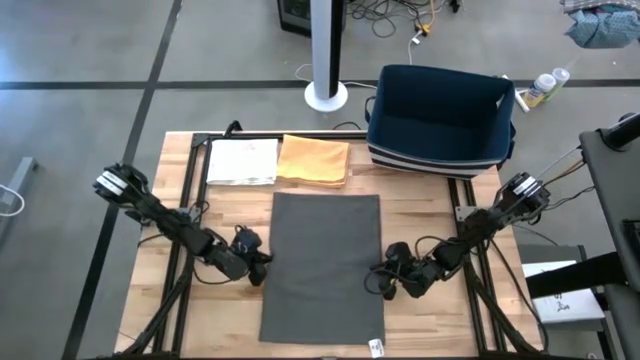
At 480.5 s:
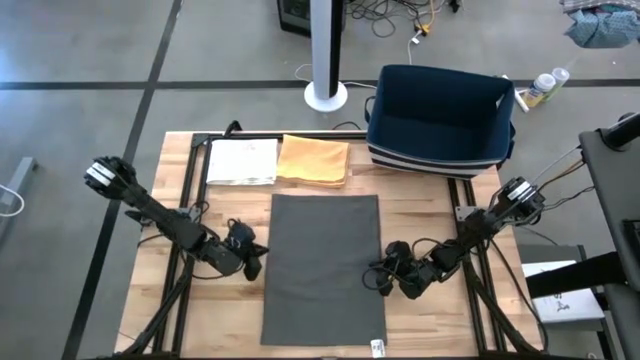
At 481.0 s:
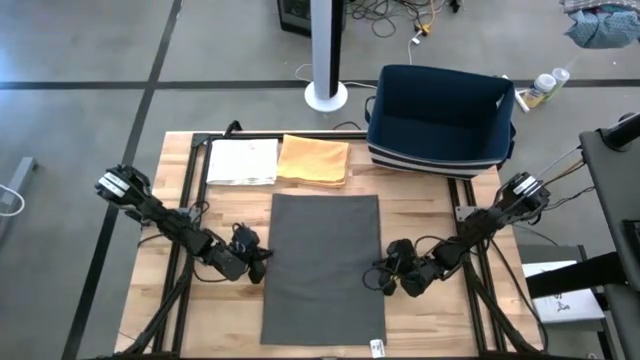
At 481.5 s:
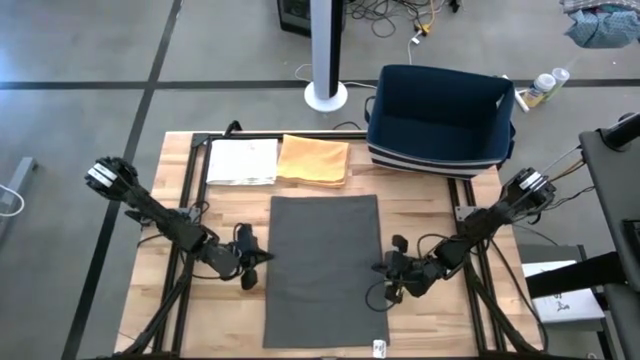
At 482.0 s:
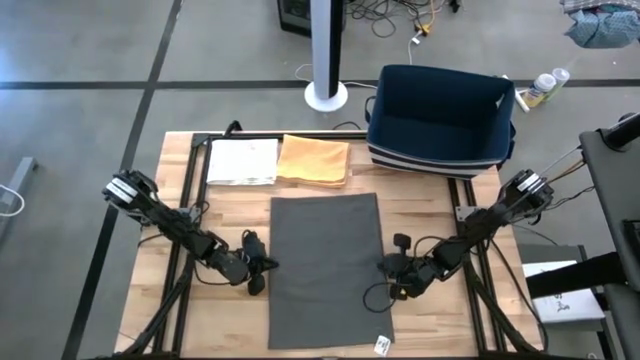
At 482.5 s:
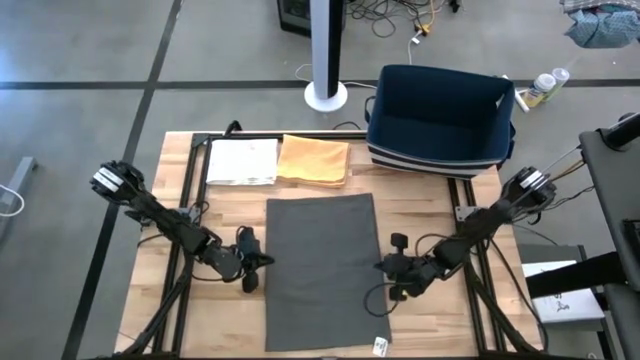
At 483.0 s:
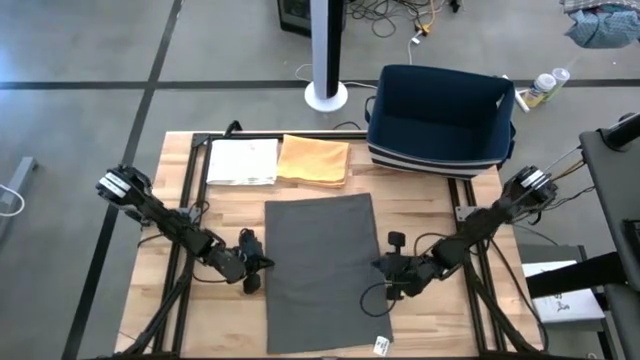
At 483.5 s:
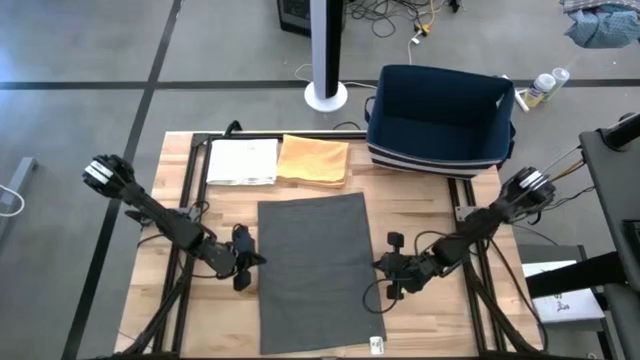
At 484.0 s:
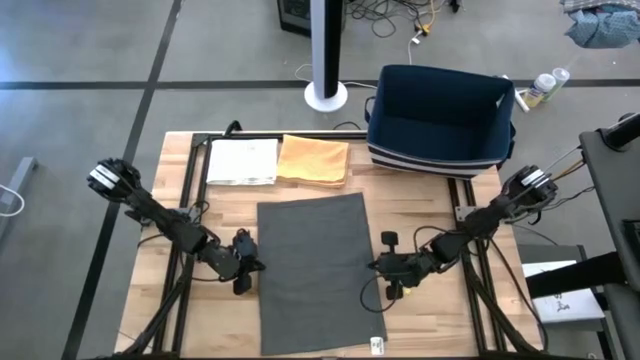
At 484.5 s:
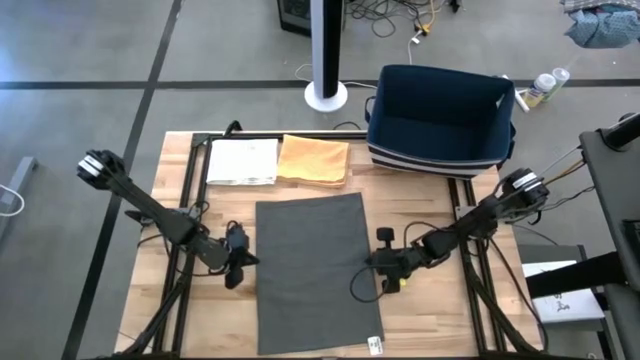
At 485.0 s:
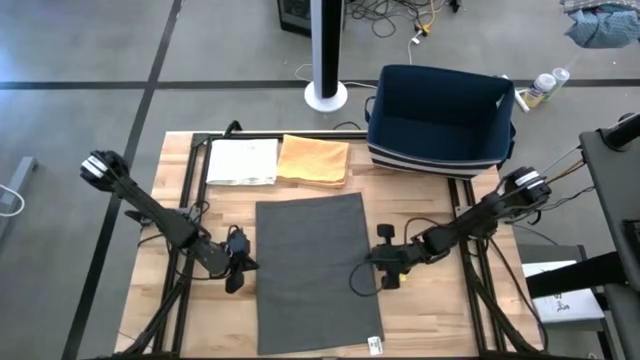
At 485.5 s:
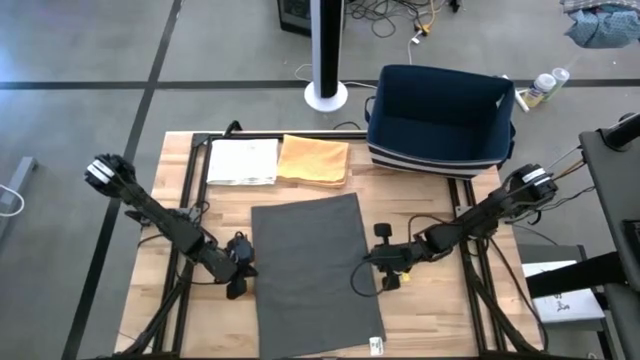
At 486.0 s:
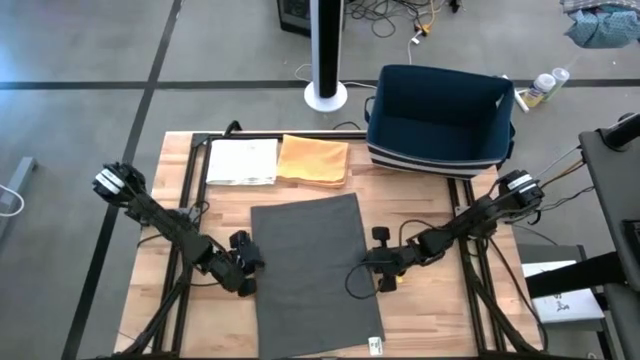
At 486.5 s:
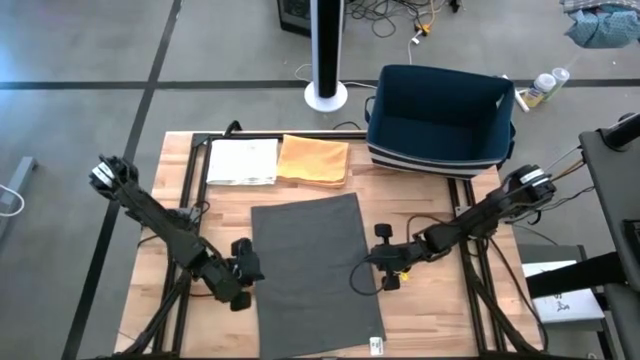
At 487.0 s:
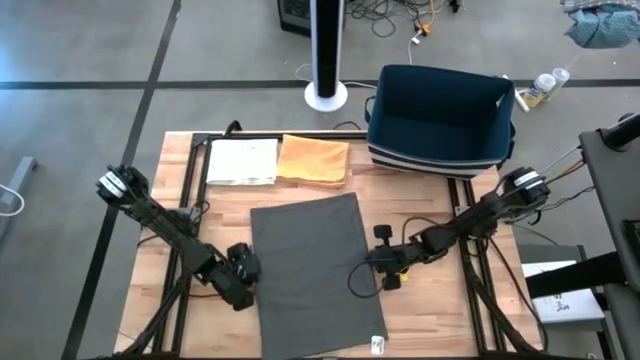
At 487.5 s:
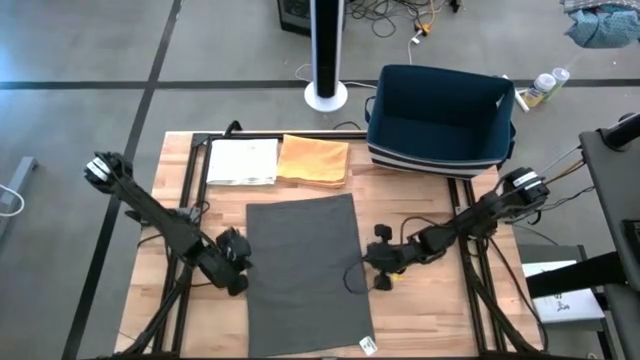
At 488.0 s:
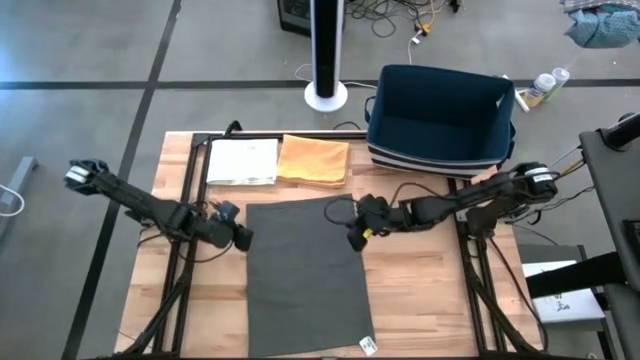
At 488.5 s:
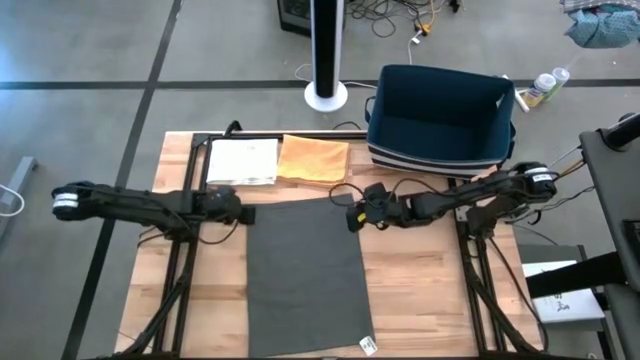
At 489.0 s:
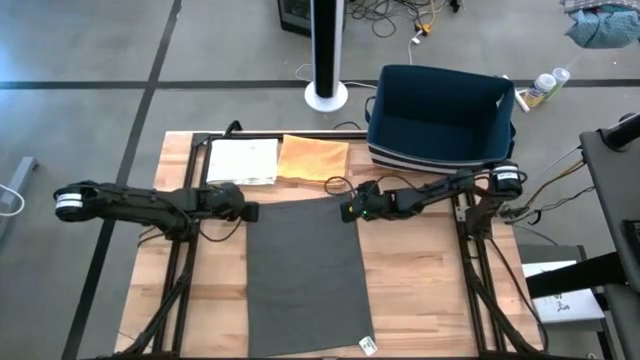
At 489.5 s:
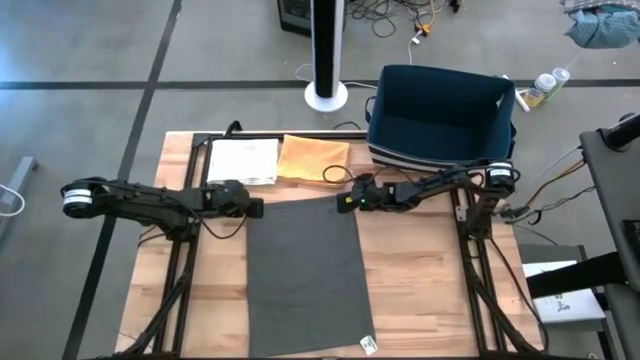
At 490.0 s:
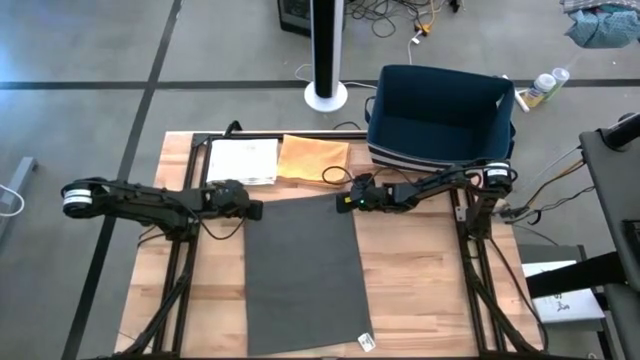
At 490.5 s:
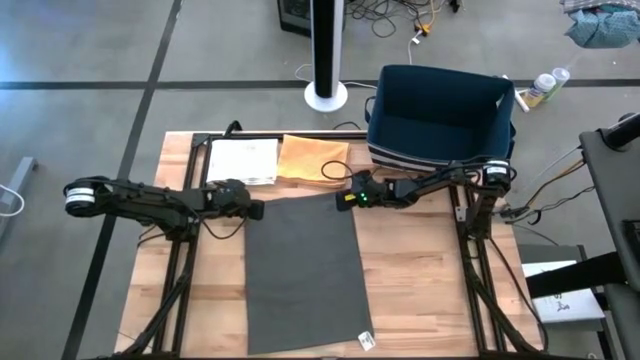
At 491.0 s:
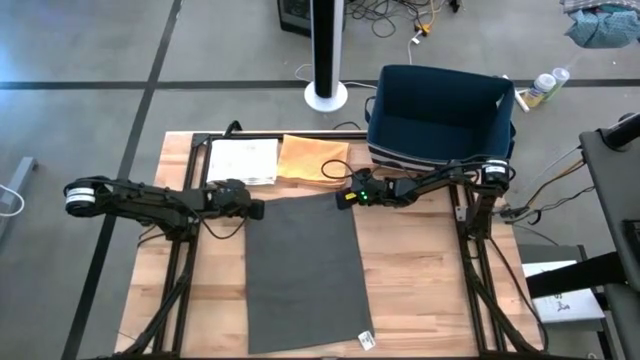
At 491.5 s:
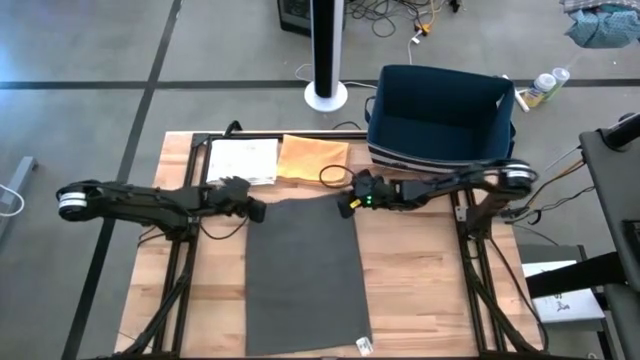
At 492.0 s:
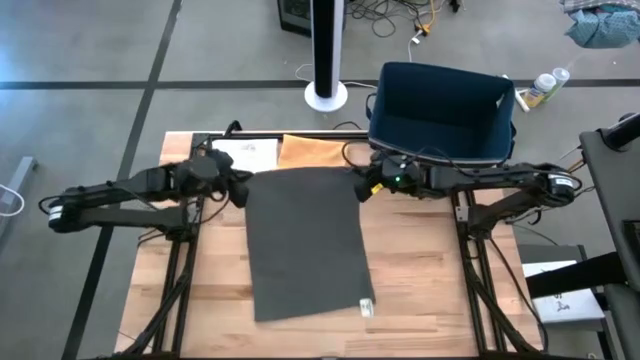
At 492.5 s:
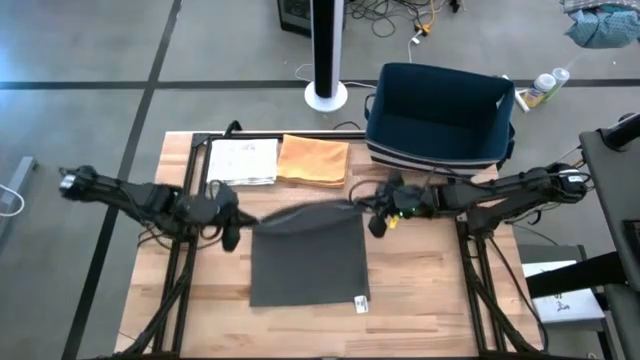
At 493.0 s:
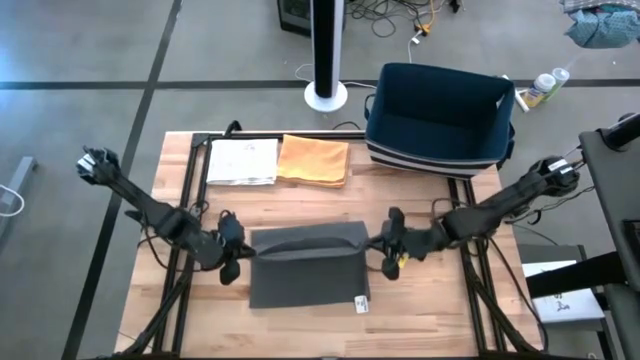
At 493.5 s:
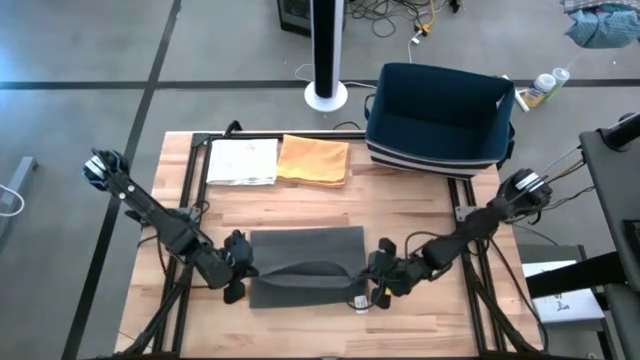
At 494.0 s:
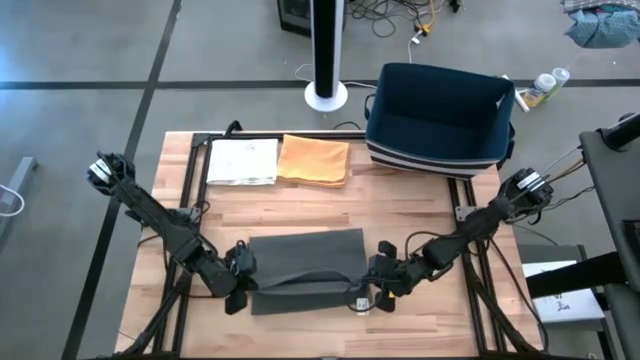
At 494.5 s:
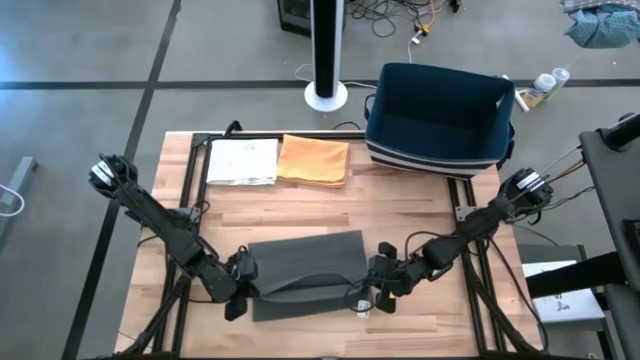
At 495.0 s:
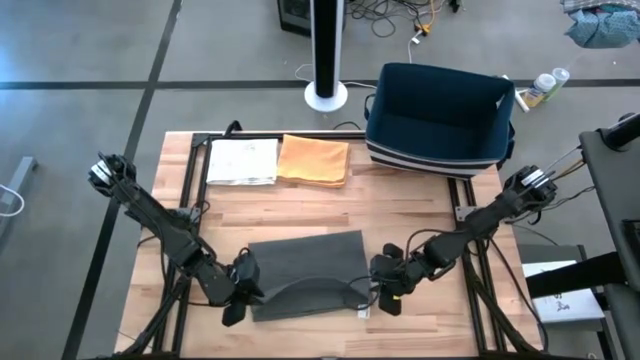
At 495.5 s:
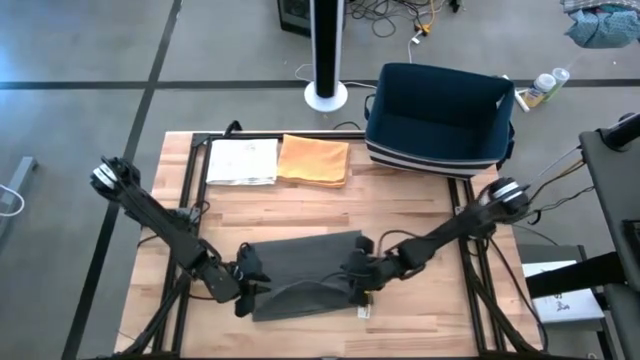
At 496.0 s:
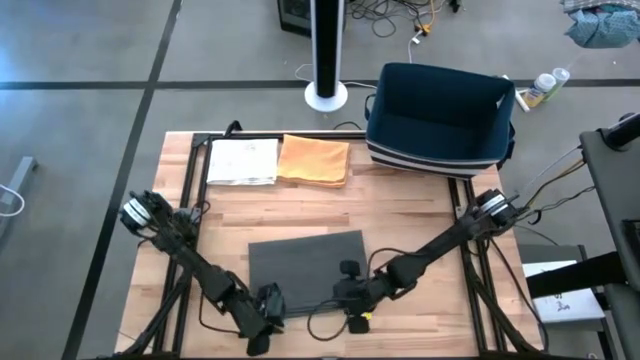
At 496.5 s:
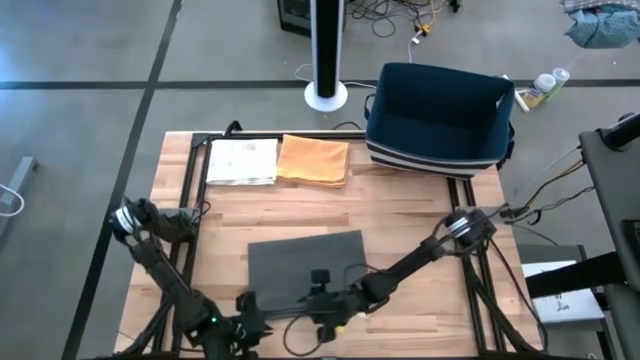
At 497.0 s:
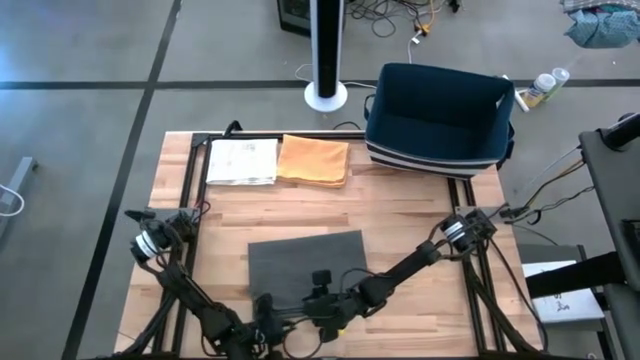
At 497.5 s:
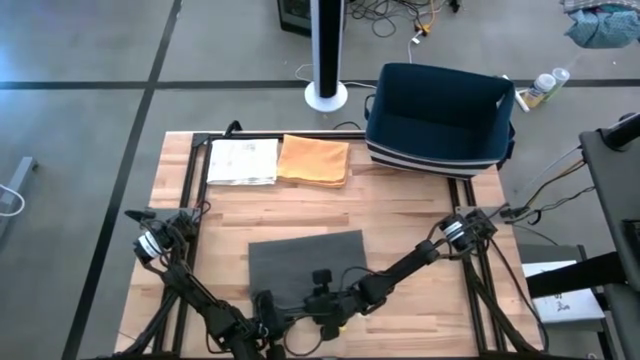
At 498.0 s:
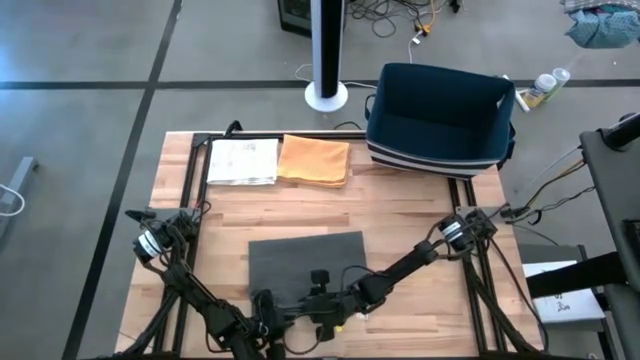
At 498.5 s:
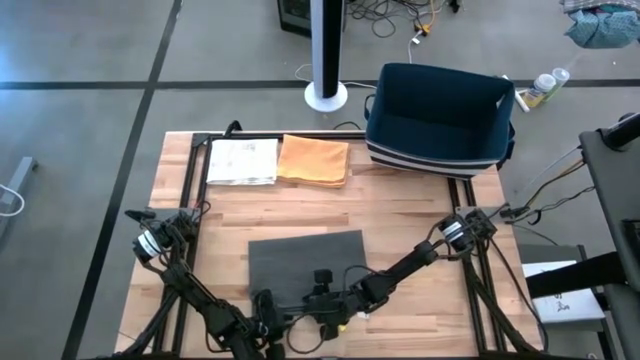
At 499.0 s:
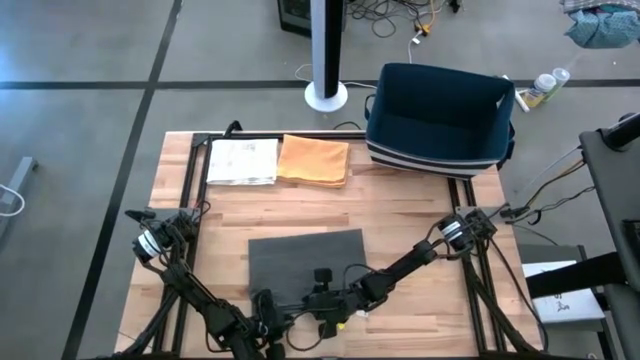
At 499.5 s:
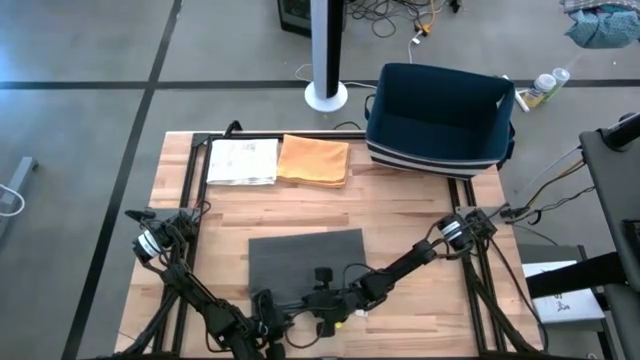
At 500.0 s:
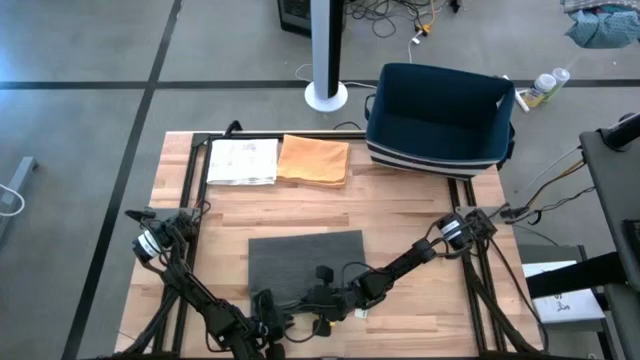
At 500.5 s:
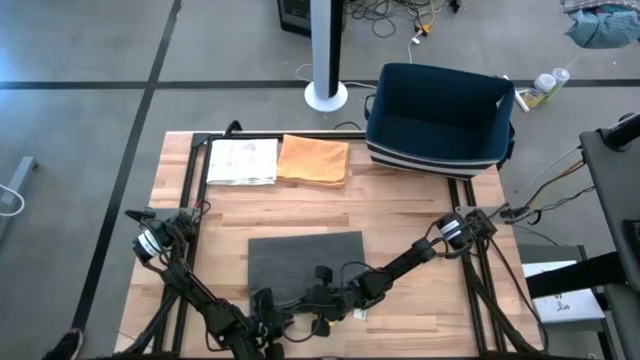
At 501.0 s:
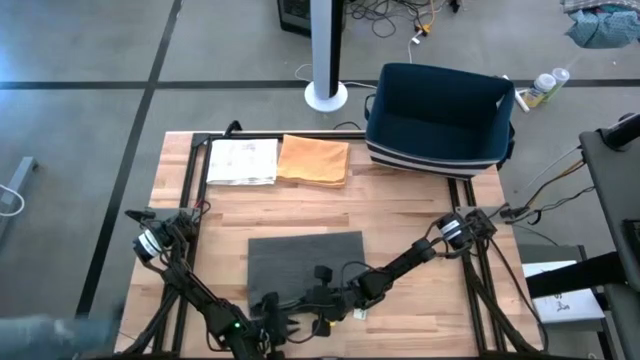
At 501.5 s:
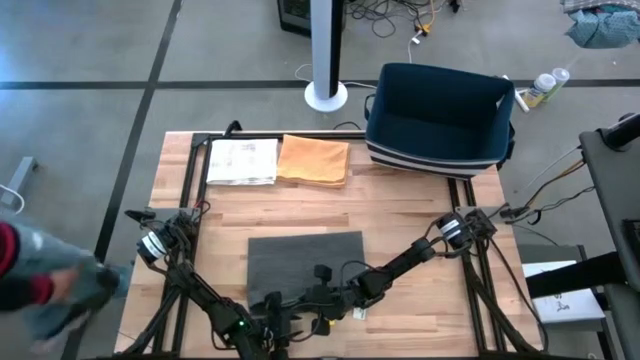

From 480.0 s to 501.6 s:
Task: Fold towel
Fold the black towel
